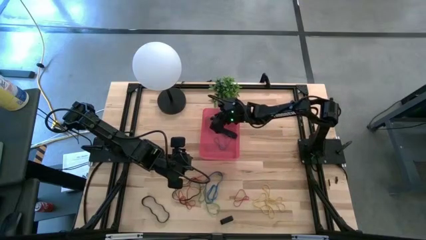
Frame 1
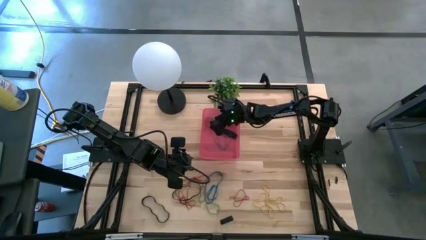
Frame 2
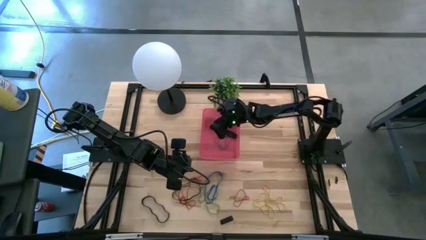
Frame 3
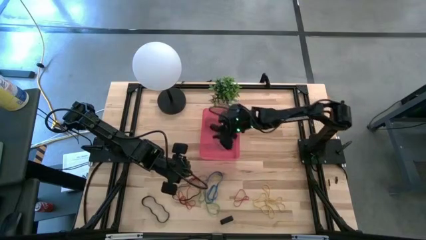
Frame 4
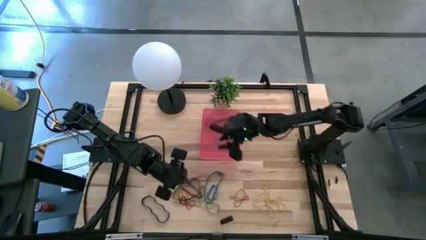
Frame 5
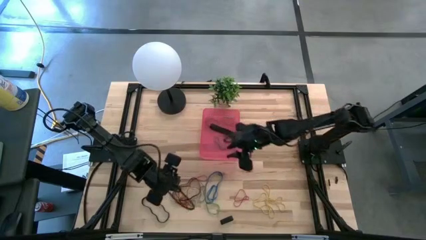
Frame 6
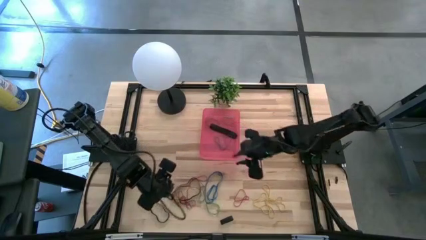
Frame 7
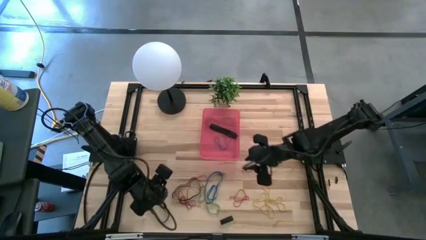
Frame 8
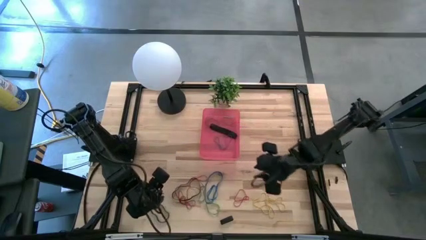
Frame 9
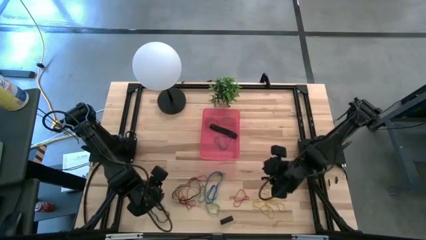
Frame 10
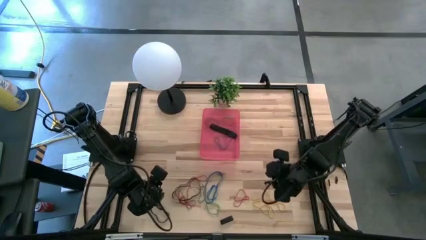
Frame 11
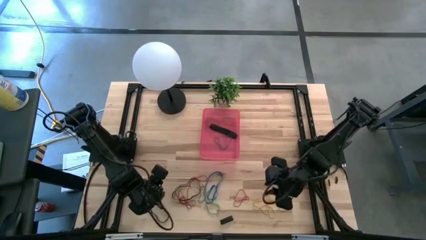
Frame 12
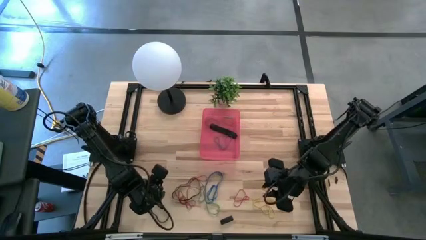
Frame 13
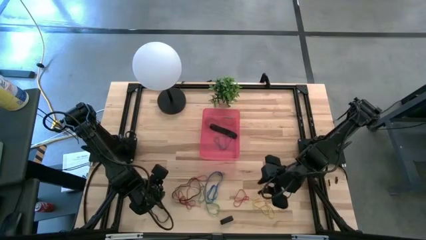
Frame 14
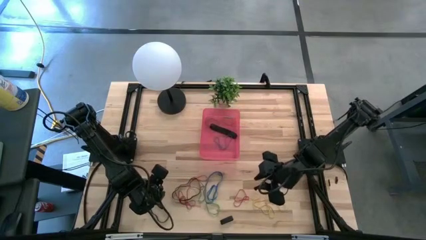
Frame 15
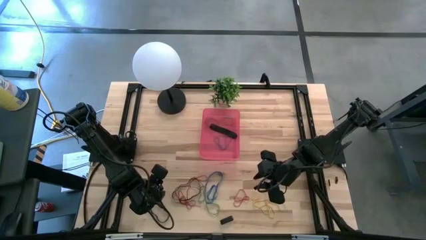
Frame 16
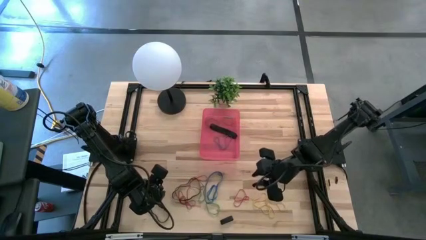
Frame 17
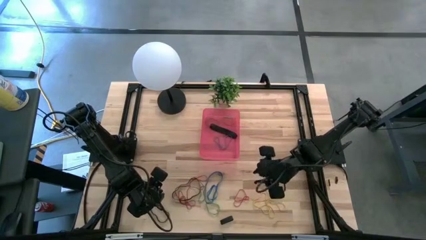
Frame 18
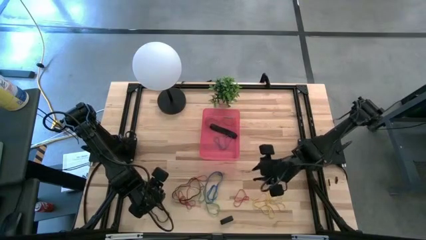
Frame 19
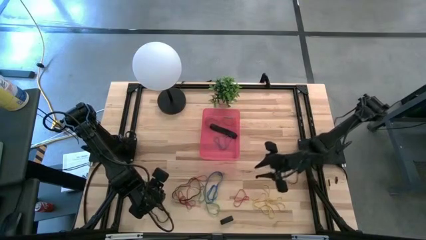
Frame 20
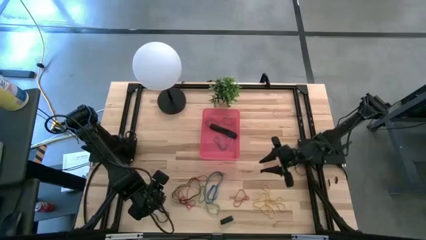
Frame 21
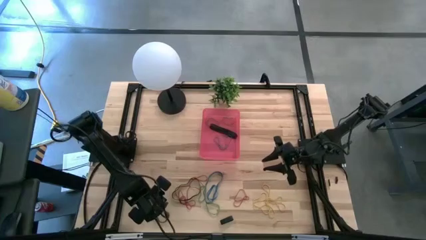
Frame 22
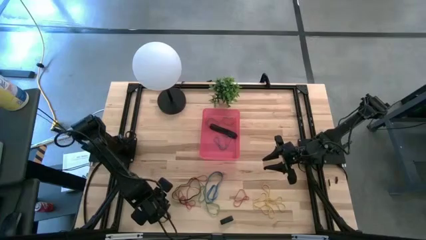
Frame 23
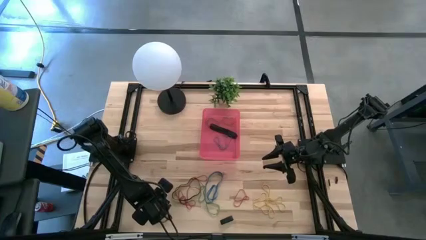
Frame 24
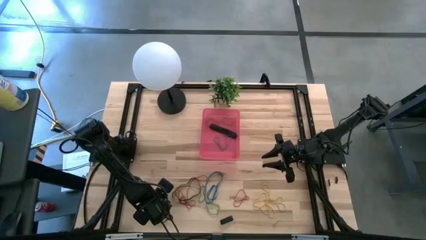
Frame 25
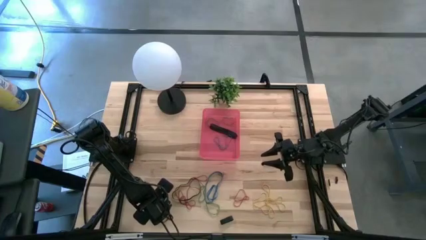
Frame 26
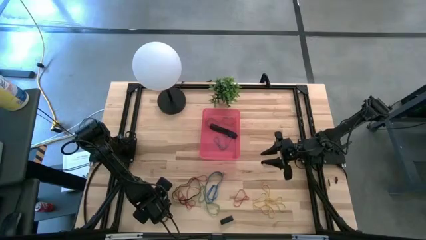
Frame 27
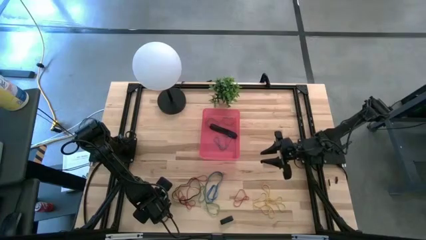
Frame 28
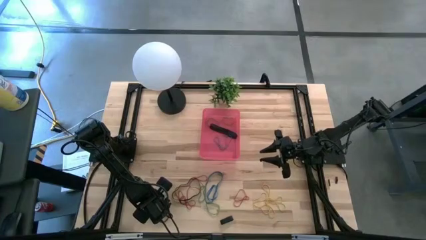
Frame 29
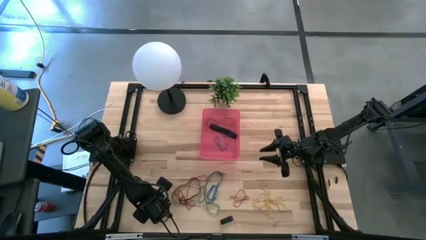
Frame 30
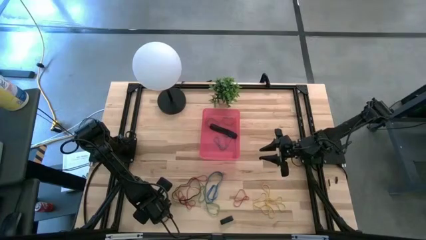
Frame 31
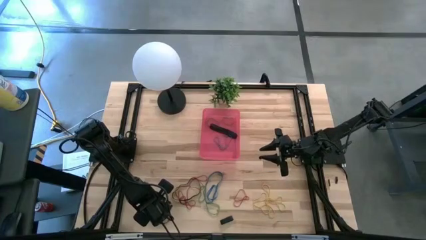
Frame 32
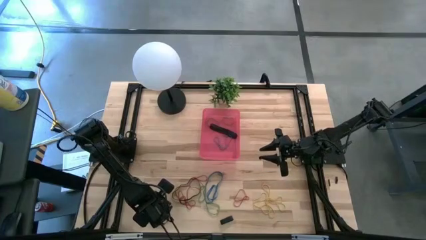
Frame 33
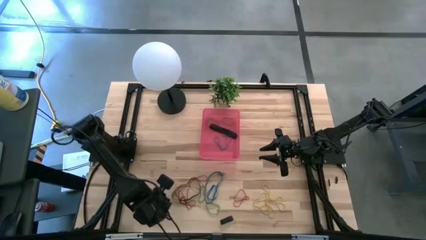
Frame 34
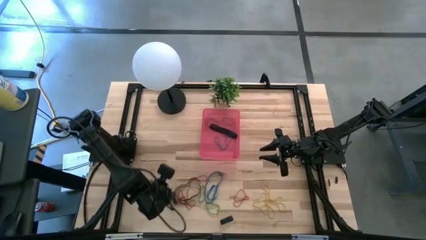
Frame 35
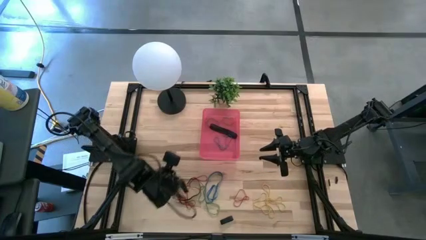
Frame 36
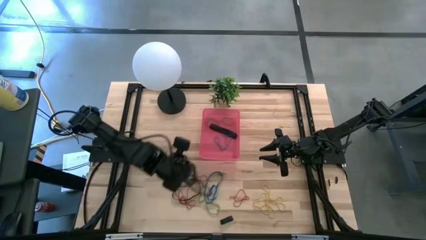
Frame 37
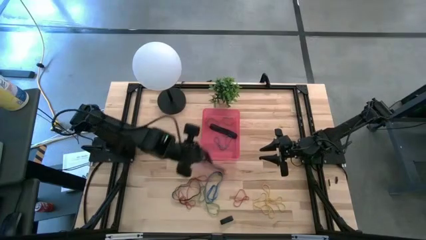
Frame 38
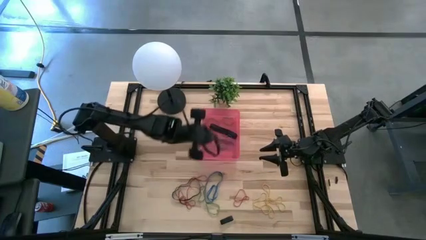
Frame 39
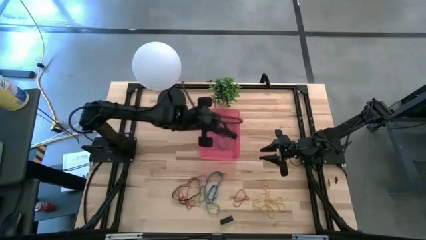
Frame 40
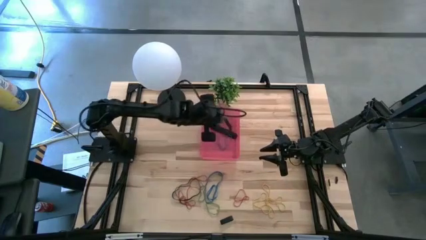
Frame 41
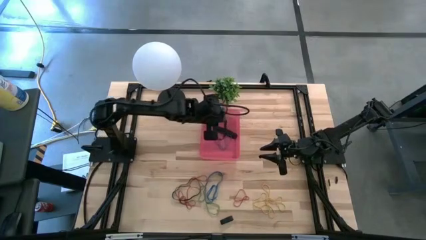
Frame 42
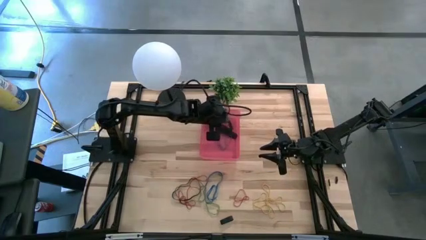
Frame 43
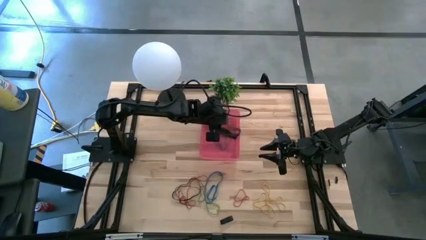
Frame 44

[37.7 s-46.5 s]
Task: Pick and place rubber bands into bin
Put the black rubber band into the red bin

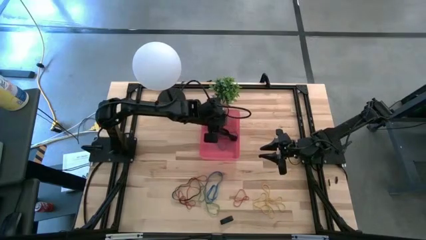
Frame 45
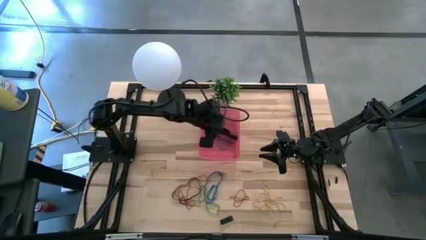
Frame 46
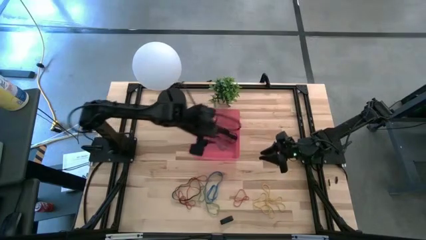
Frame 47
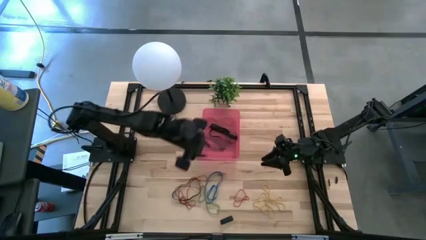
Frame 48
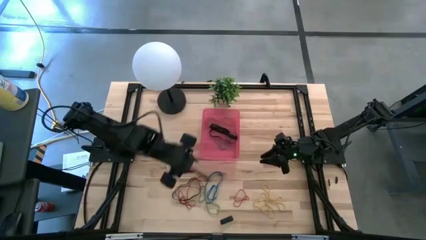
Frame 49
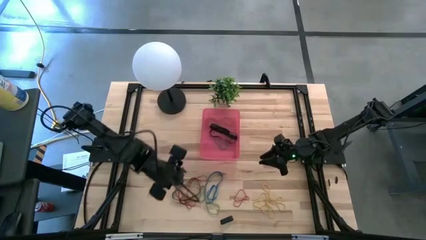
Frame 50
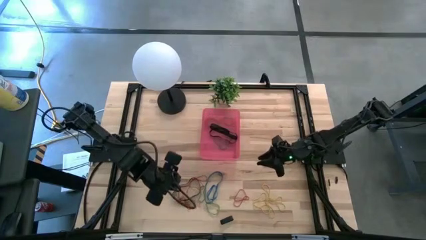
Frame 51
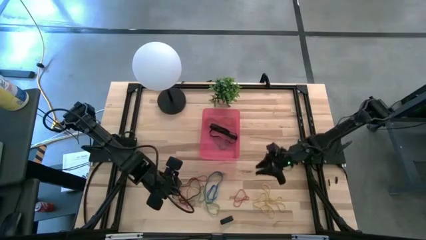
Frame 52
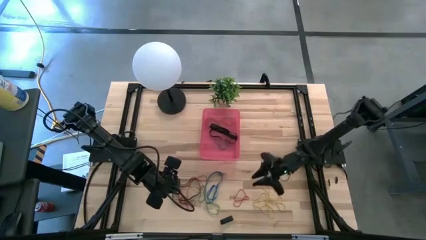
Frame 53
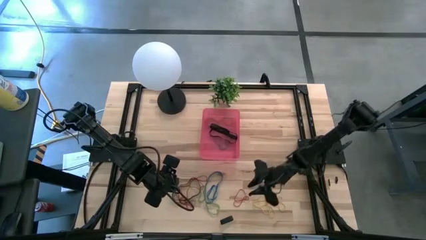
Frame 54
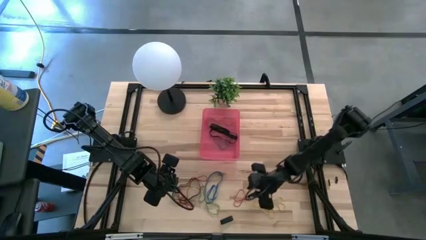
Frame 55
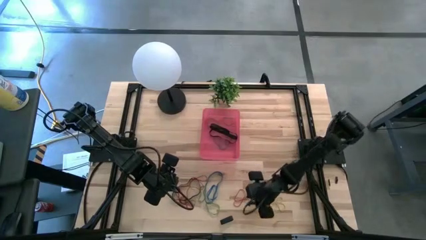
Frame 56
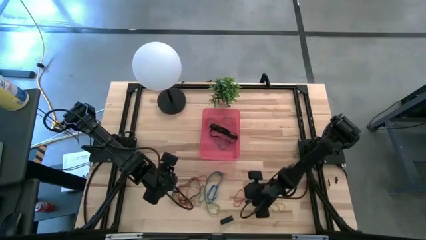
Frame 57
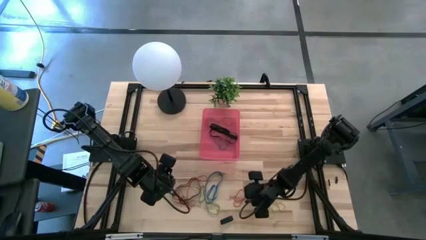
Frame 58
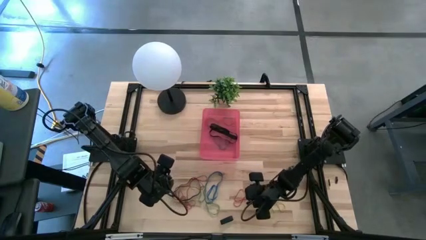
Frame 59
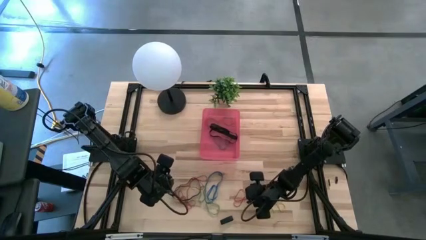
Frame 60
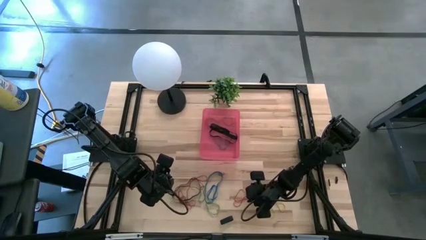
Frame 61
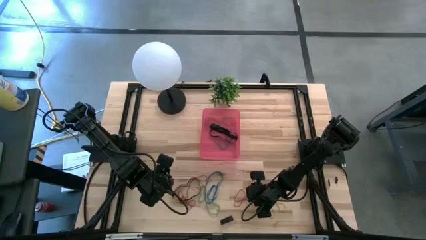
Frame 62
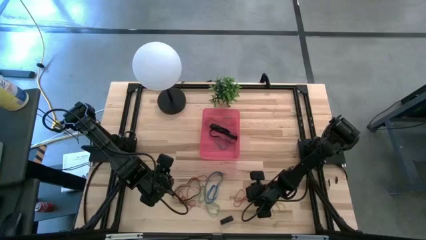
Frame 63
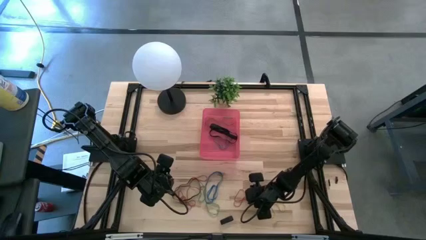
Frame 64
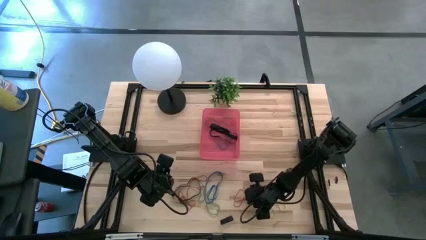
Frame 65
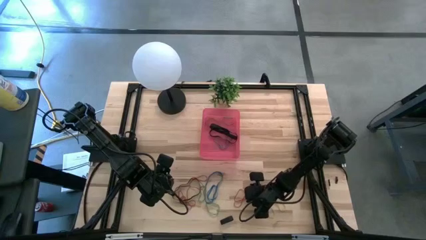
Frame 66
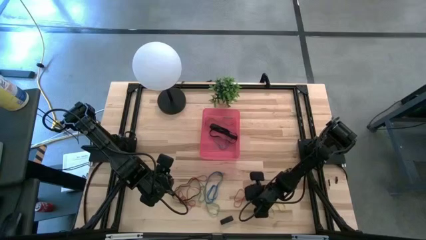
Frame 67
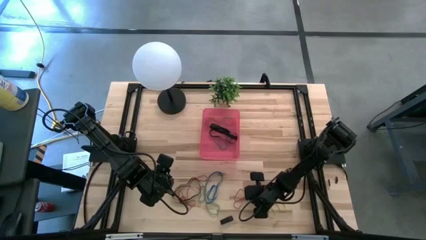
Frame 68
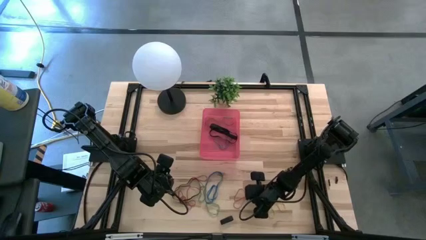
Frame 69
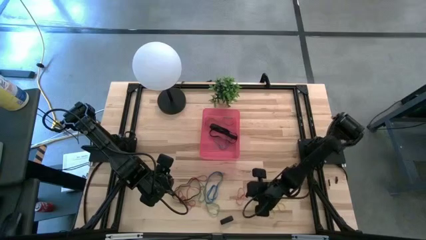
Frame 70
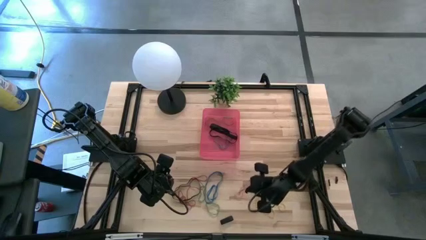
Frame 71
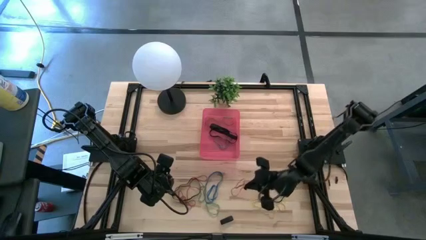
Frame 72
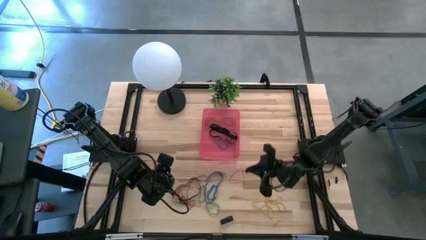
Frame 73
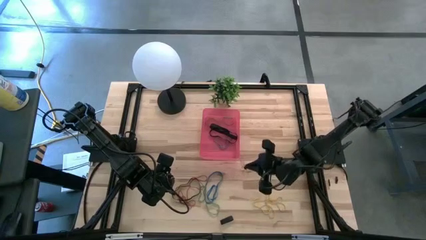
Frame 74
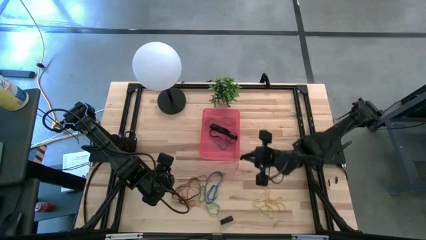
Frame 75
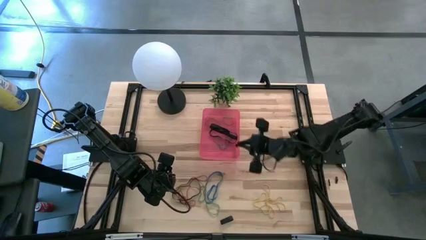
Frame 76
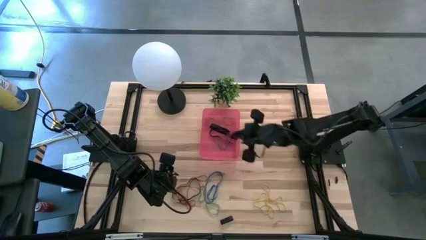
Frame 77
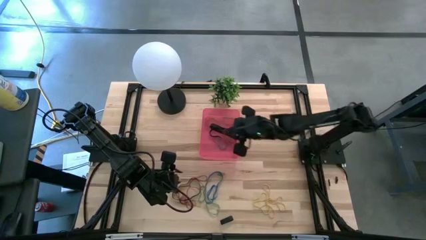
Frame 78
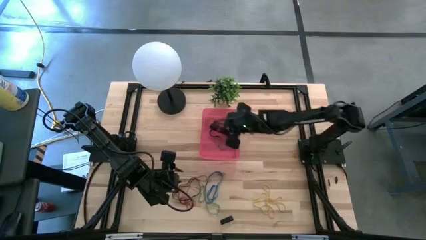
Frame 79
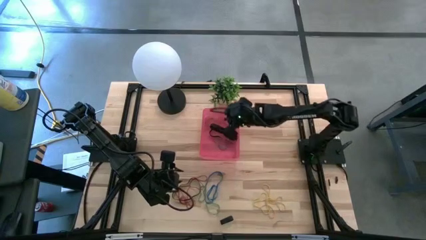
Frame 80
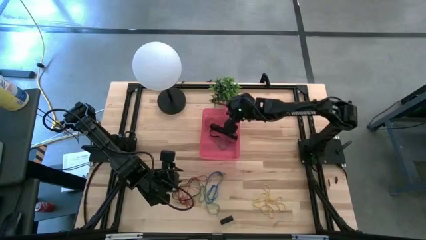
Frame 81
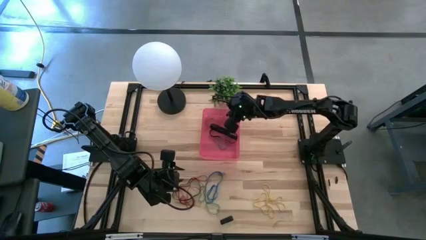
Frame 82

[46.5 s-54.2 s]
Put the red rubber band into the red bin
